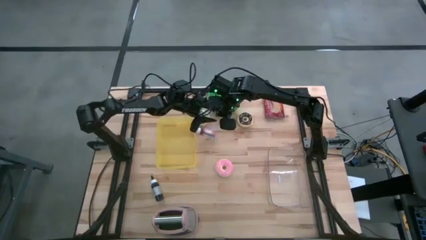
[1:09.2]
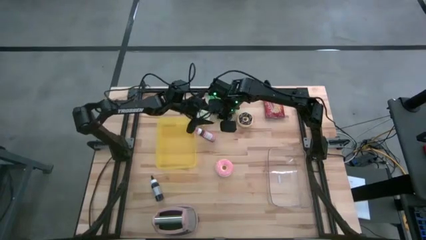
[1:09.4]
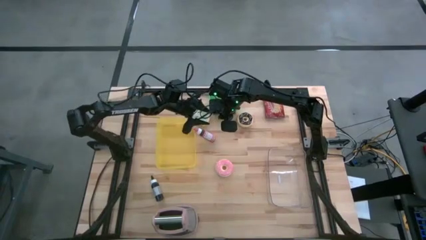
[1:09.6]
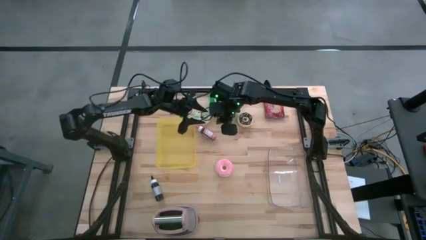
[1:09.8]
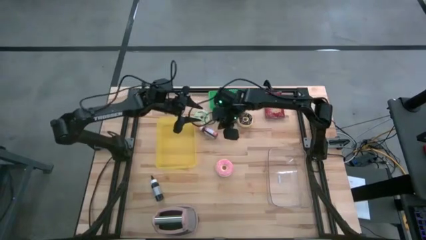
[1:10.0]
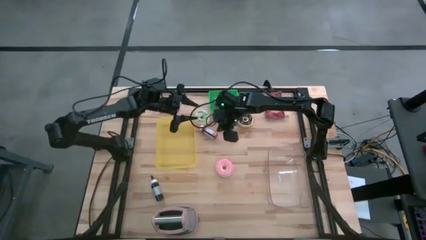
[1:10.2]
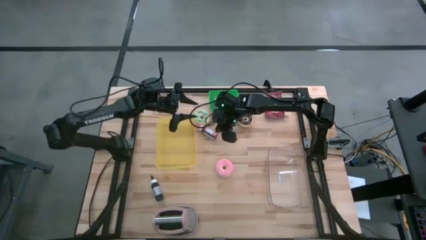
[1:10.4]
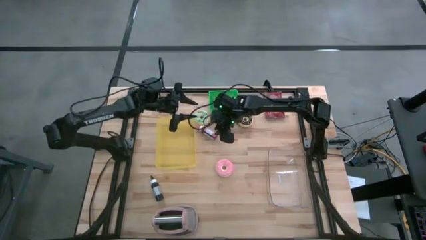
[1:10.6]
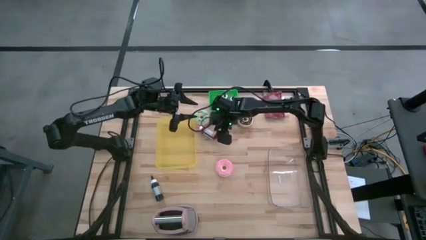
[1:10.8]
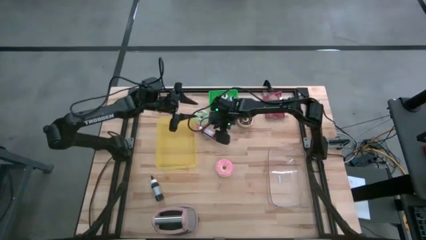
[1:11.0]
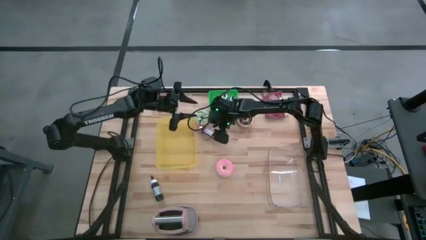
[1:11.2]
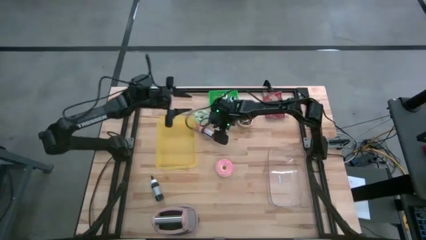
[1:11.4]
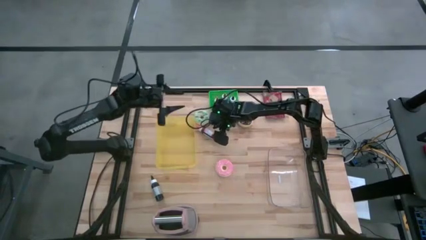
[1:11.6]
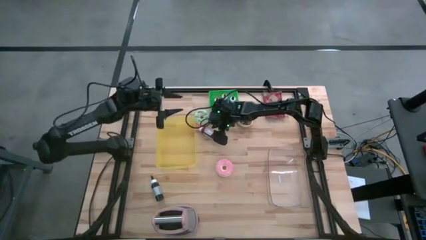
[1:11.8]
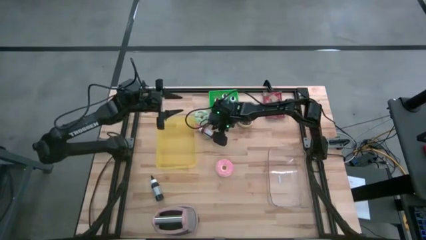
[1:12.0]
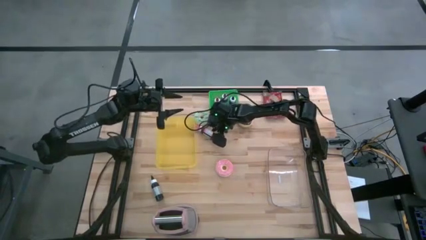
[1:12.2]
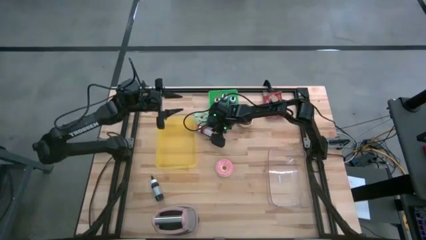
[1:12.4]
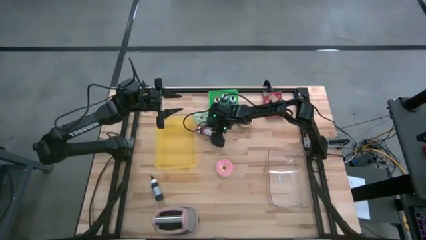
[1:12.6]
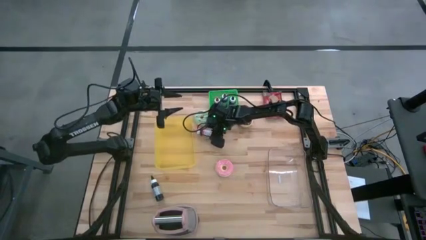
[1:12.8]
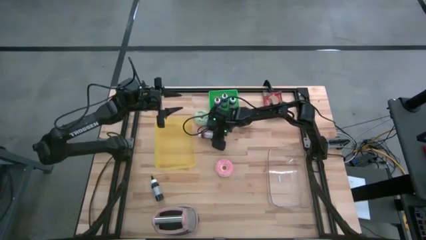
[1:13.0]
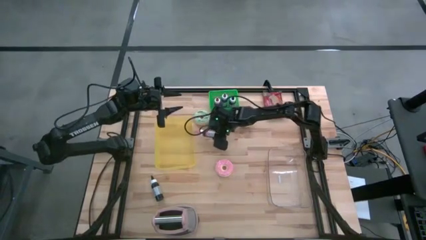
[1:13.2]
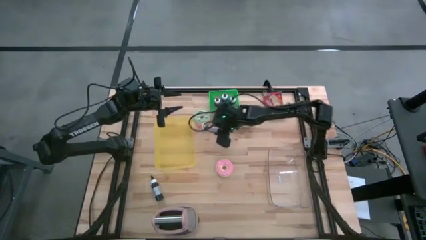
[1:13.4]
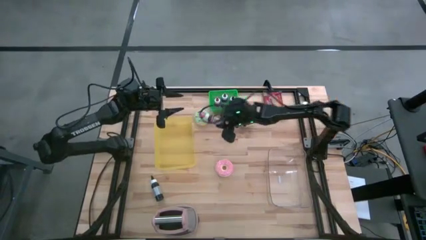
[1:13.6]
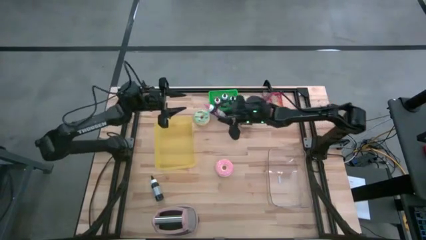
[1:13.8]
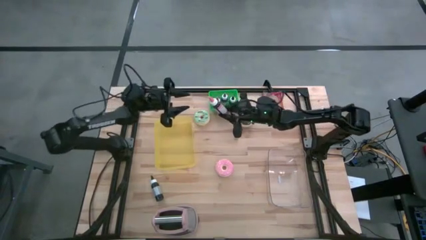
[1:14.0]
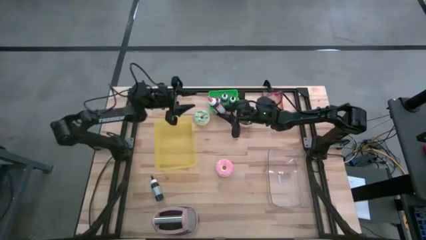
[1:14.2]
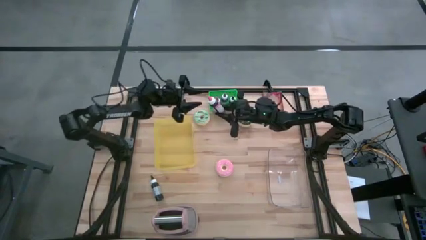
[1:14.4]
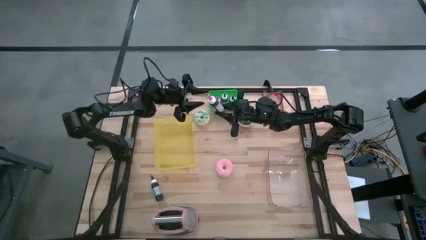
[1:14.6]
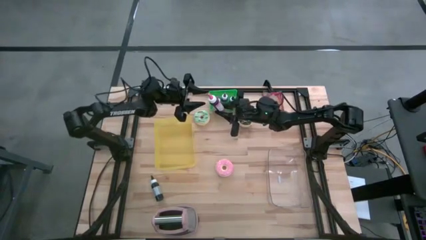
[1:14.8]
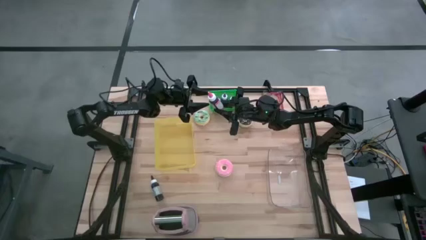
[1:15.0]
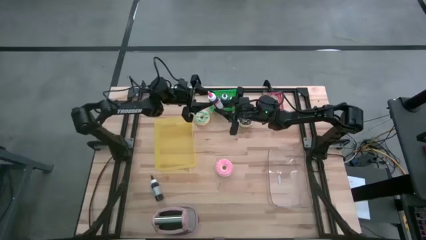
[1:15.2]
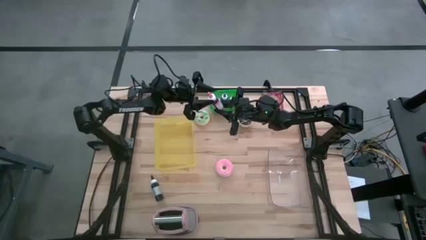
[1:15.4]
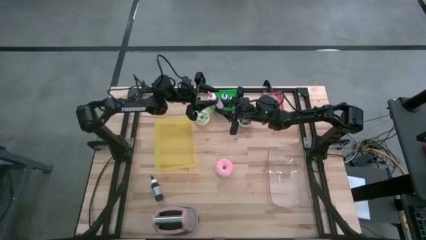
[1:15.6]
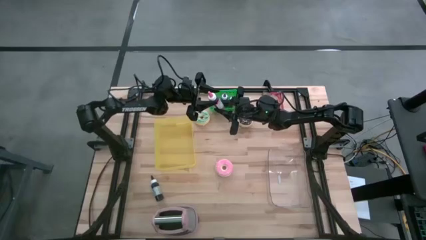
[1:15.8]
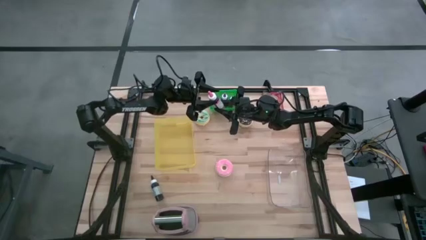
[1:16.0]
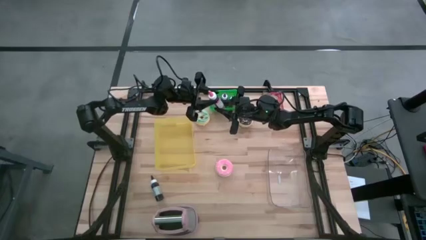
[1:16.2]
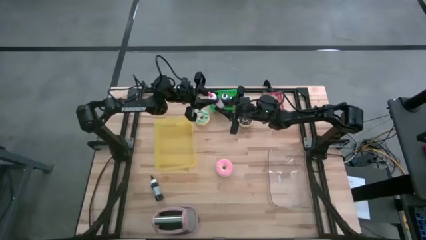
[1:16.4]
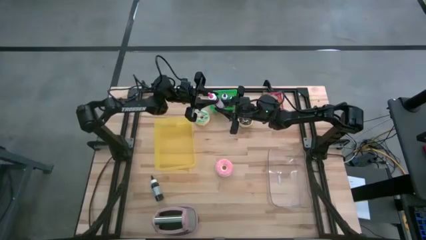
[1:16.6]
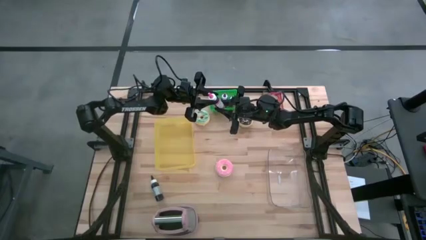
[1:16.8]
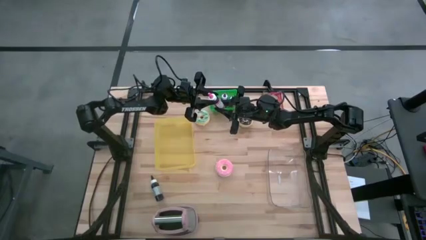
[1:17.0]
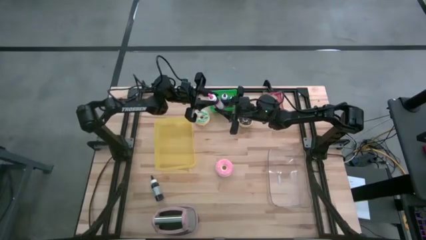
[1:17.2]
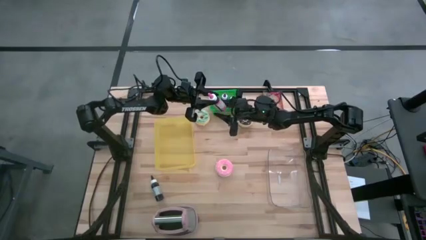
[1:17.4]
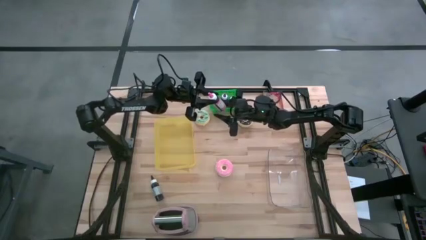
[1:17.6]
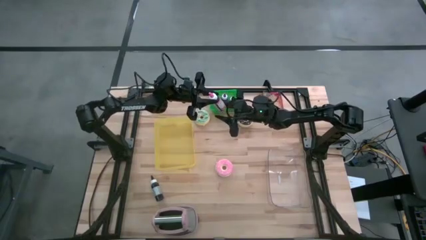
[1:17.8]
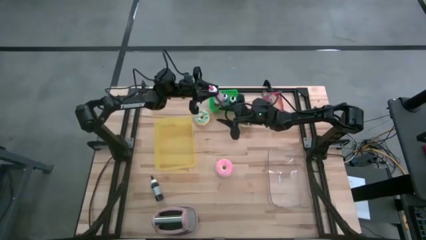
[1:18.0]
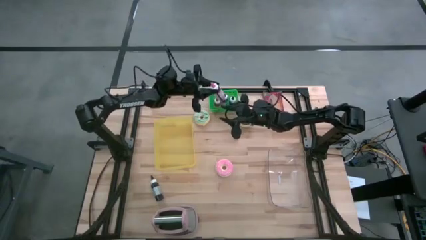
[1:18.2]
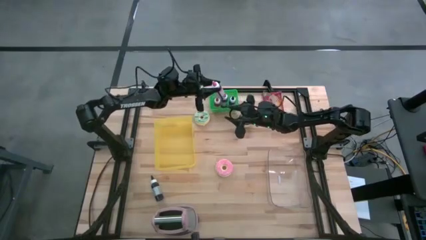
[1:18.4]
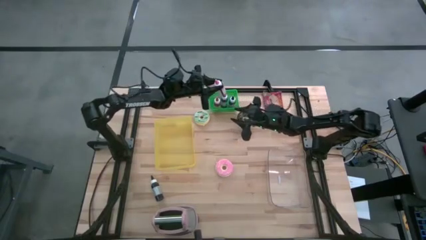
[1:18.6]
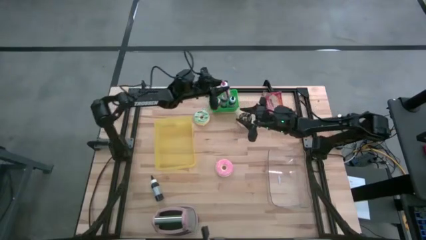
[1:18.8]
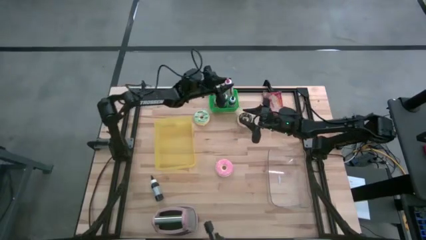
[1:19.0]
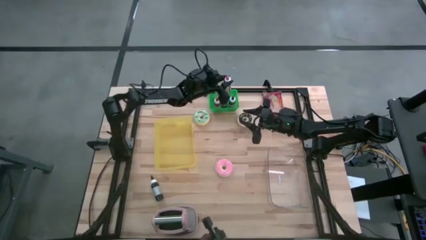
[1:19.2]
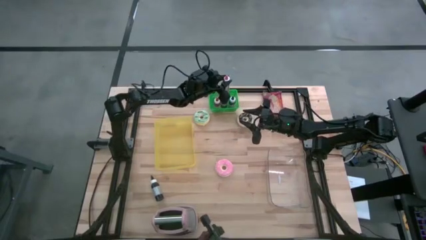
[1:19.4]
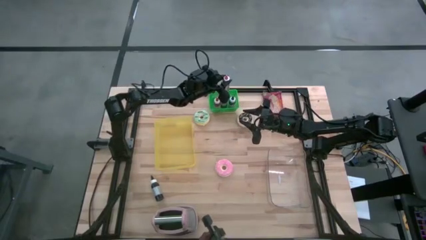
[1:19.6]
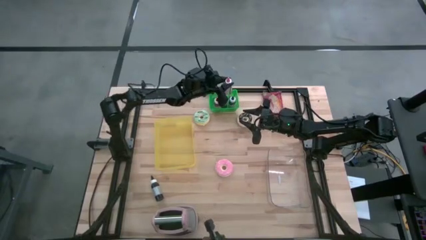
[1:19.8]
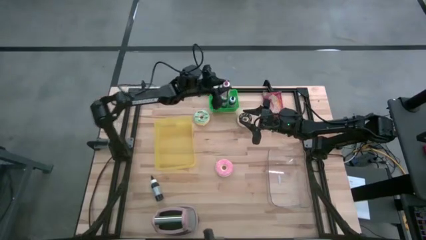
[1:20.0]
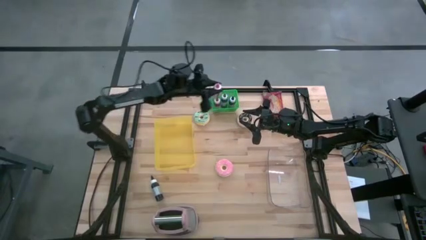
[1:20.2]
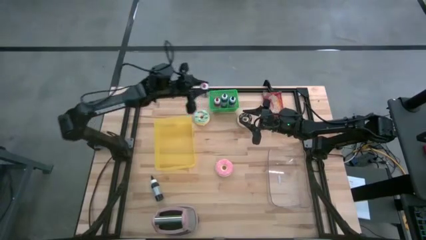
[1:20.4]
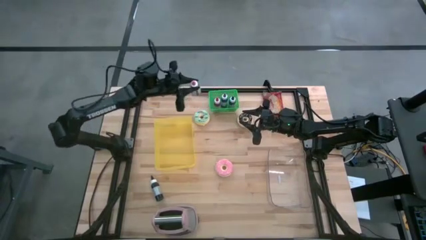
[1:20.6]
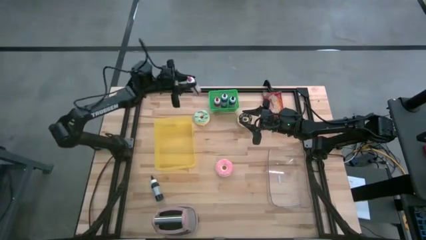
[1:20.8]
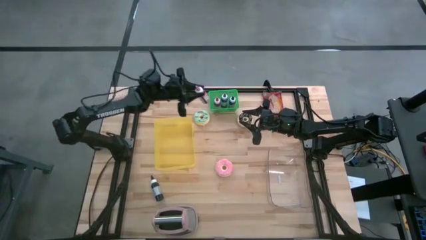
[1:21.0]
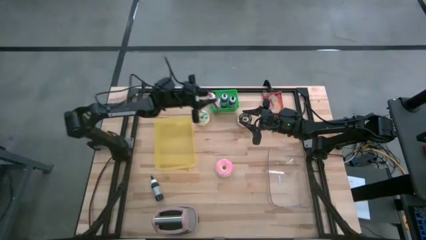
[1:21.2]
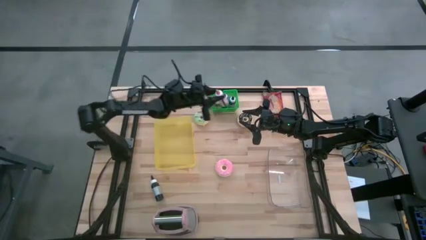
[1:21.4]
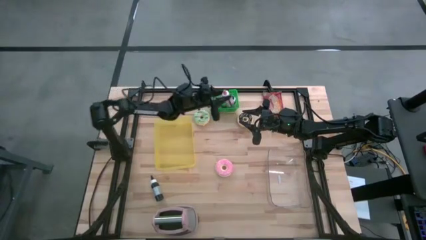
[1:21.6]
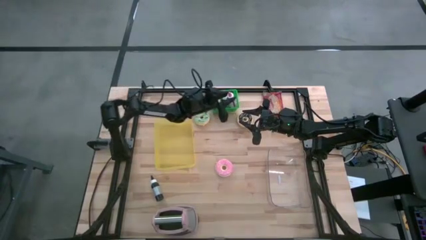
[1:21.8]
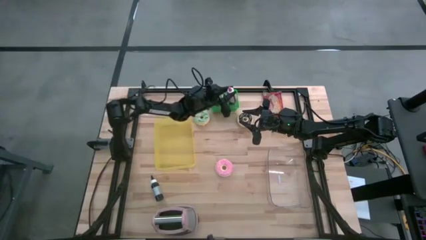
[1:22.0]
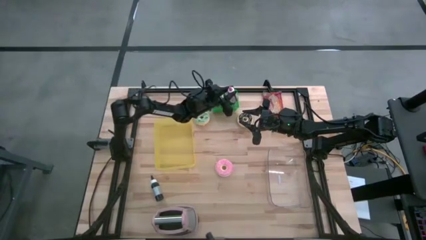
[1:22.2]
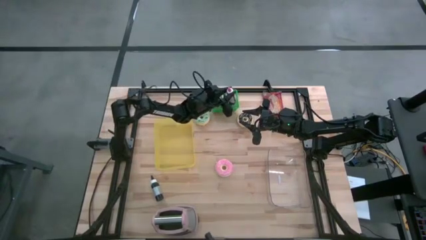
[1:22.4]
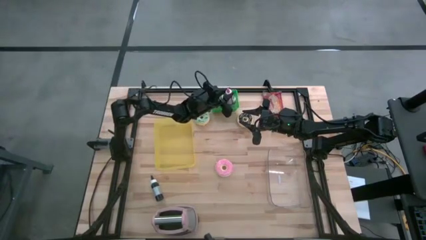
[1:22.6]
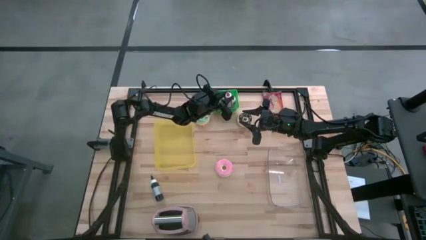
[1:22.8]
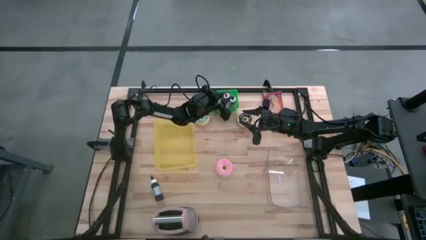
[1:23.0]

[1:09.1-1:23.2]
Task: Pick & Place Food Item
Put the pink food coloring bottle into the green bin

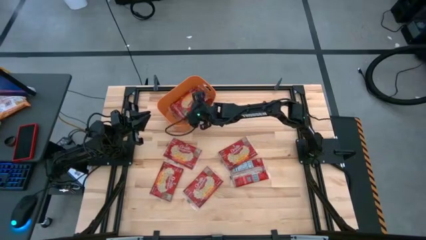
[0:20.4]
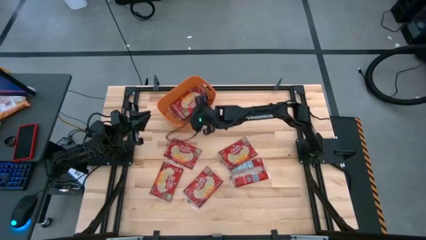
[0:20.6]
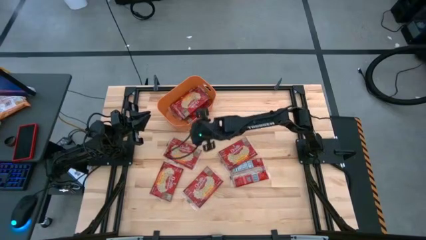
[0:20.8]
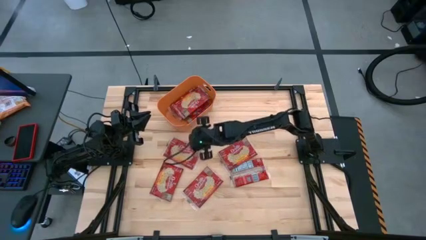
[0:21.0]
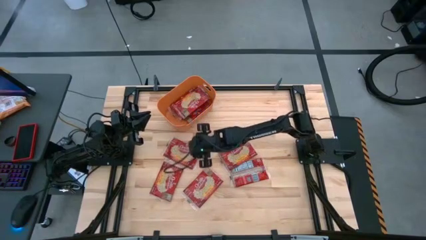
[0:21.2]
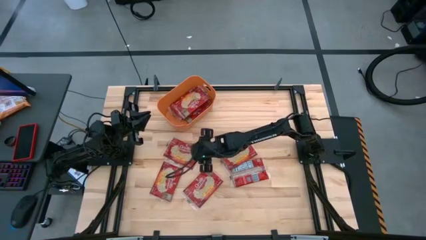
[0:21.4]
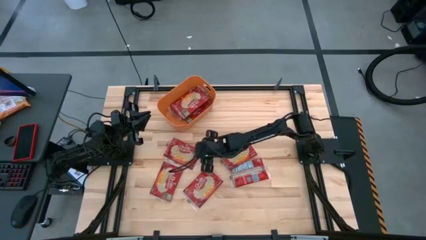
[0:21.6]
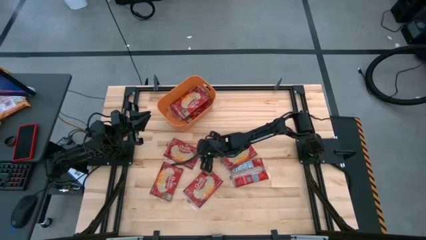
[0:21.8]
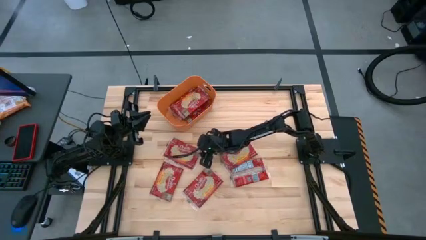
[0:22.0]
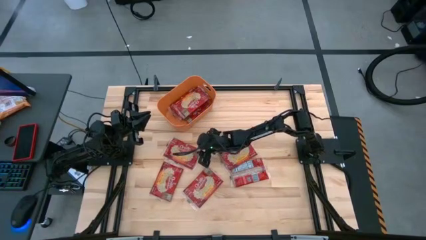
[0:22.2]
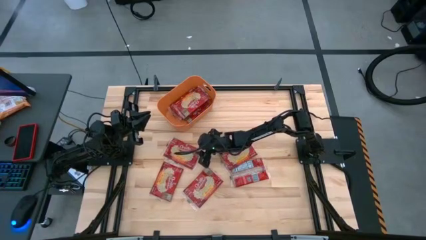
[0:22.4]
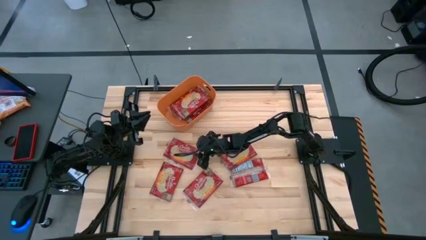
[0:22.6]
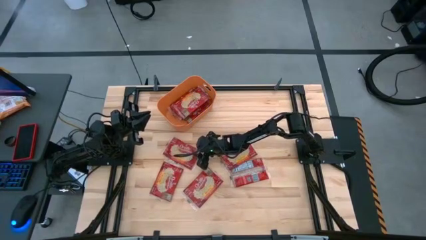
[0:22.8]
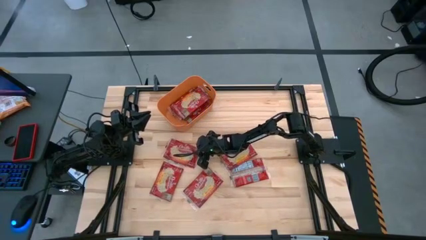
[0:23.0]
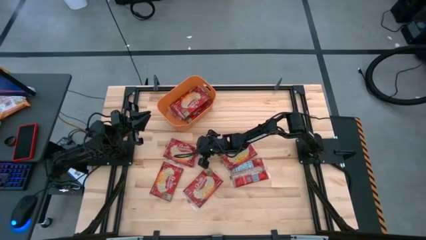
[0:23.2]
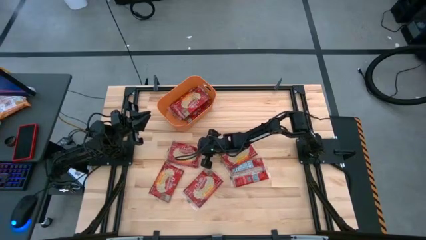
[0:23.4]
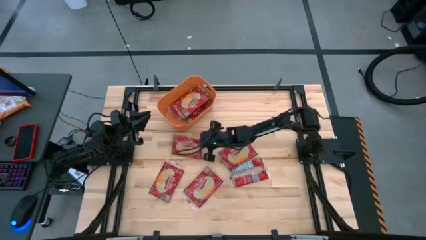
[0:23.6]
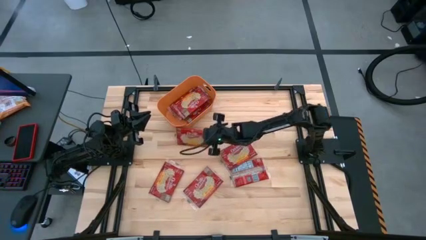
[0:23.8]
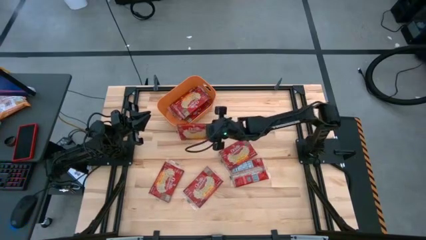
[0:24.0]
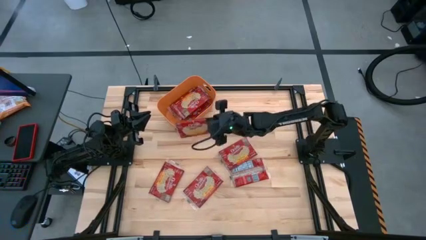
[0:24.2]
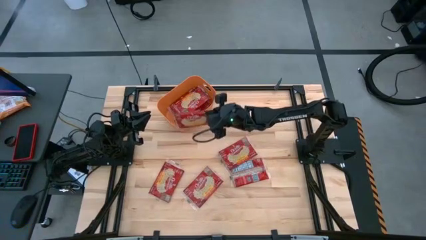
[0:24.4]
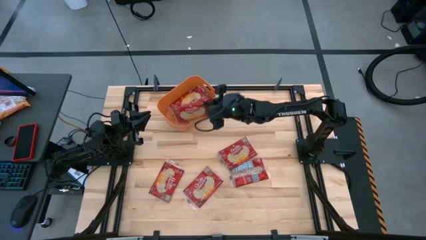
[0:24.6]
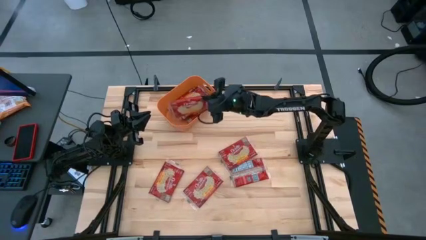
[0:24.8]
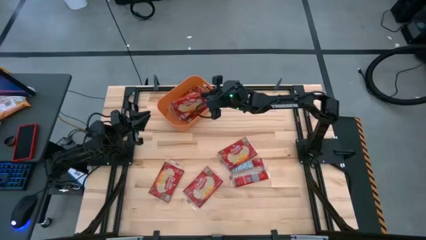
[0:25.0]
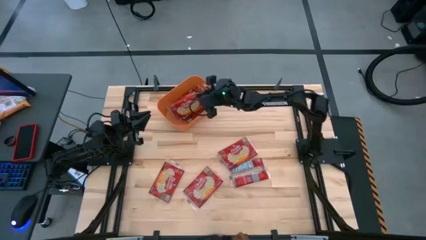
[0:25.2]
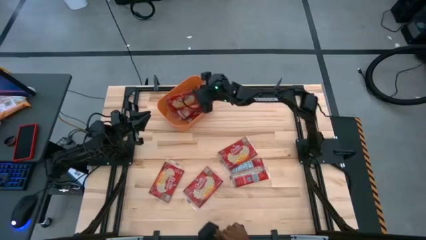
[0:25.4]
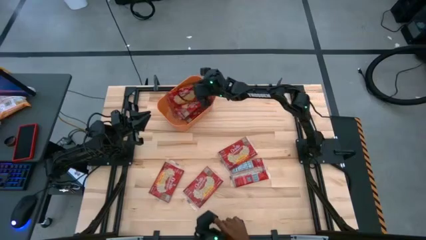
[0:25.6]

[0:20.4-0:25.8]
Task: Sort popcorn bags into baskets
Put the red popcorn bag into the orange bin
